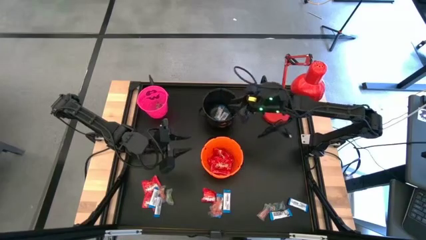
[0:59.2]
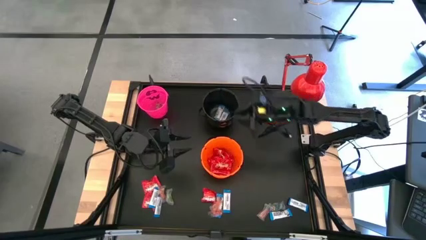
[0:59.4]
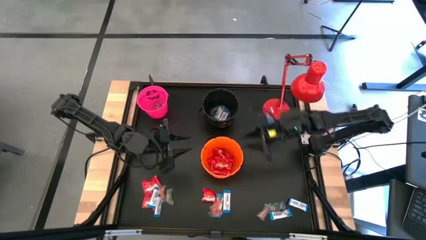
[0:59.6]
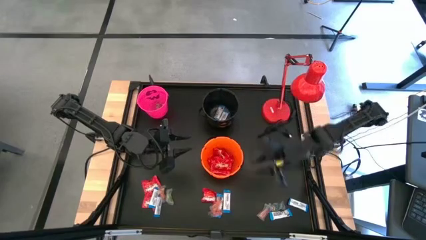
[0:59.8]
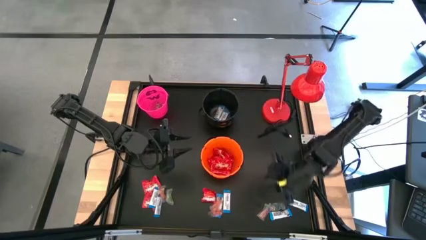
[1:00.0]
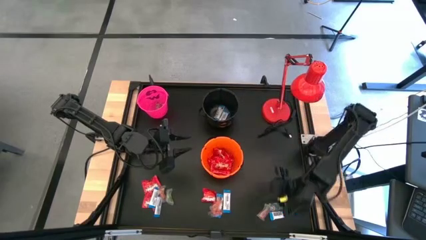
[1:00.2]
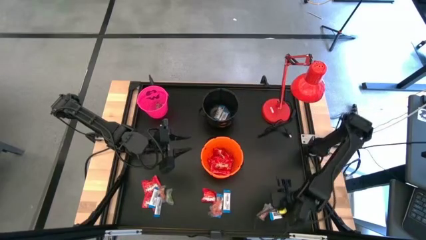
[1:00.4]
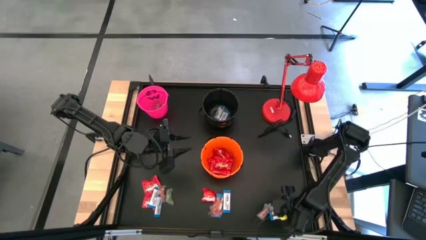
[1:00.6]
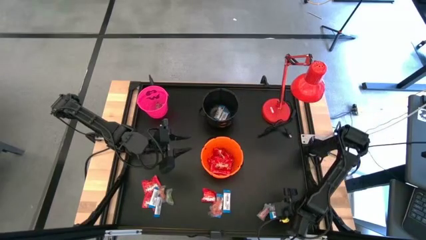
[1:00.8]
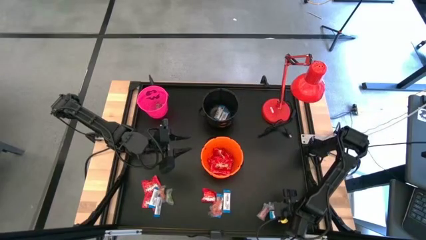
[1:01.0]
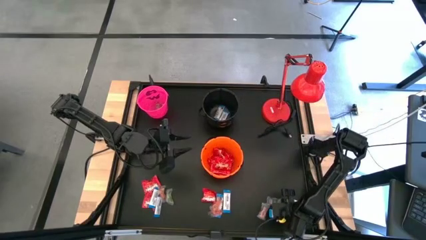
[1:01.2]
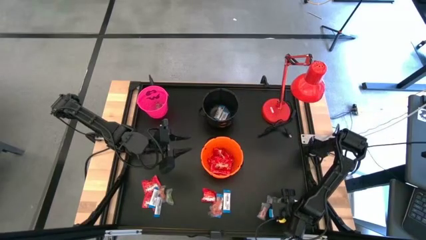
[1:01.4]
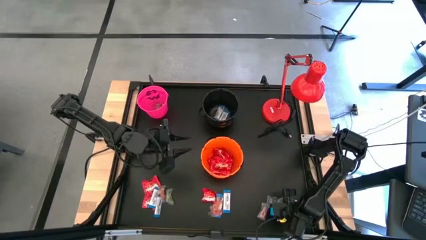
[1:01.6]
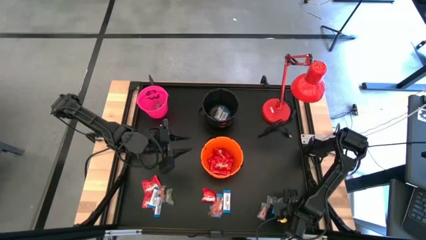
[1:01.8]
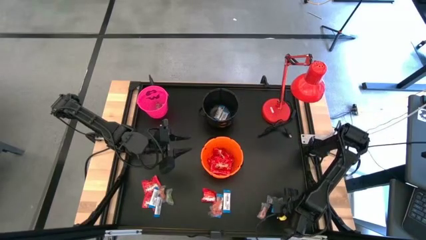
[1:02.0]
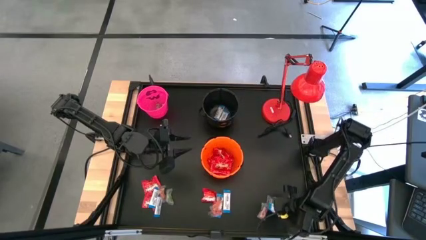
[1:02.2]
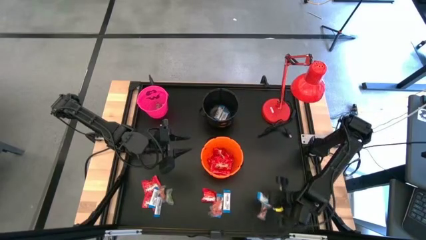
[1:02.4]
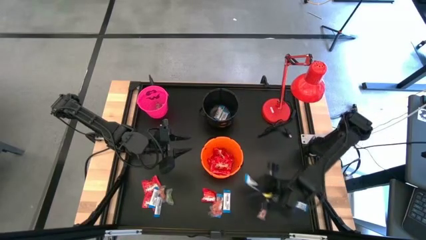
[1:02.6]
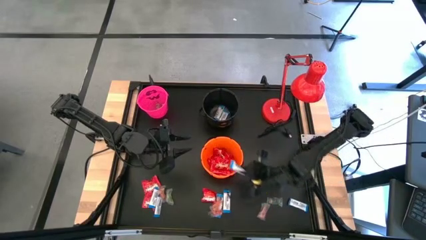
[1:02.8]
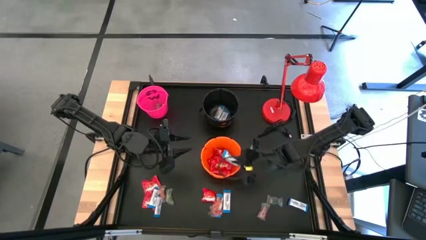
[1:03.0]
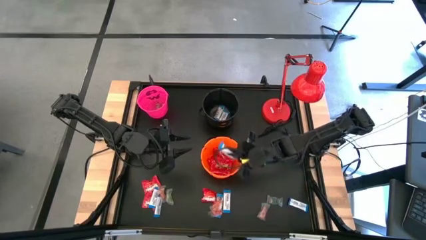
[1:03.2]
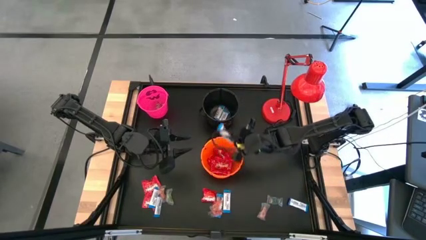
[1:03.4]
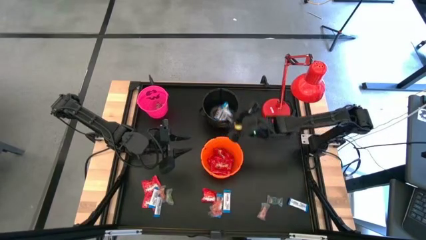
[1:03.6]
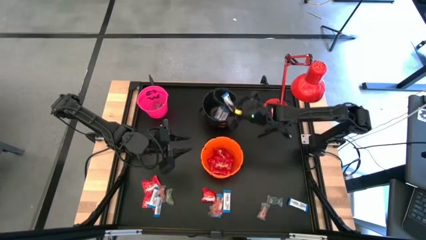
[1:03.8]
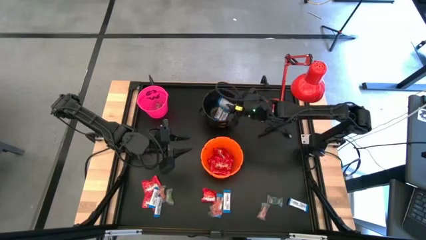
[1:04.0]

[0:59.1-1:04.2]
Task: Sort candy
Put the white chocolate into the black bucket

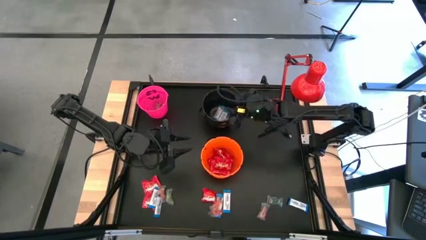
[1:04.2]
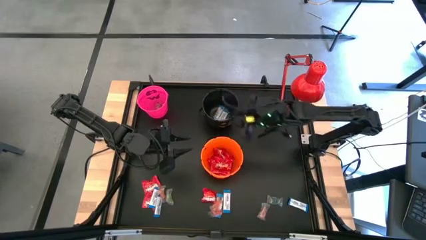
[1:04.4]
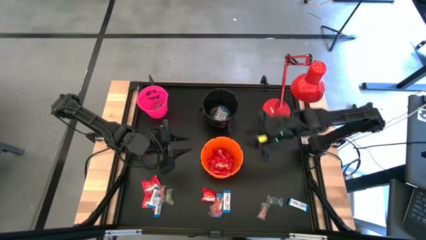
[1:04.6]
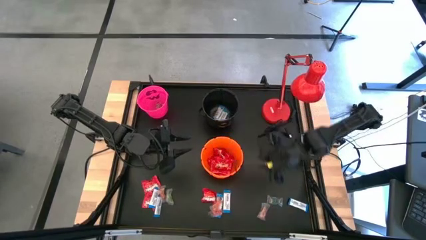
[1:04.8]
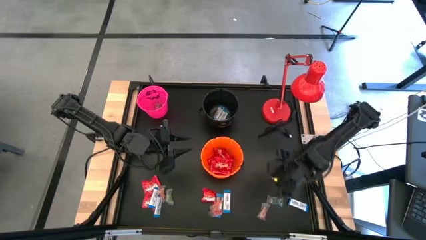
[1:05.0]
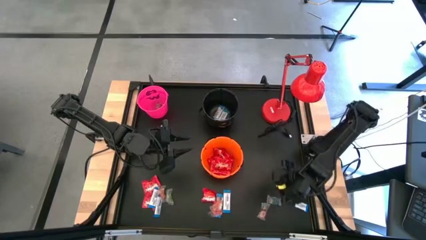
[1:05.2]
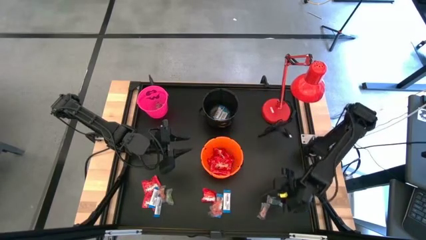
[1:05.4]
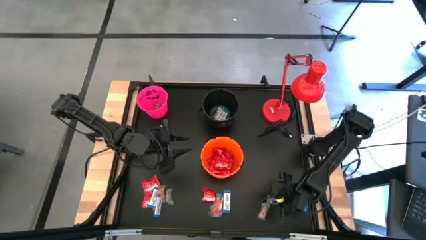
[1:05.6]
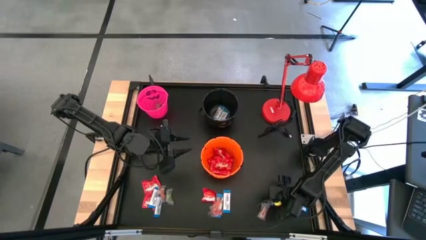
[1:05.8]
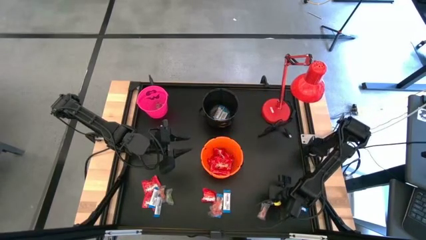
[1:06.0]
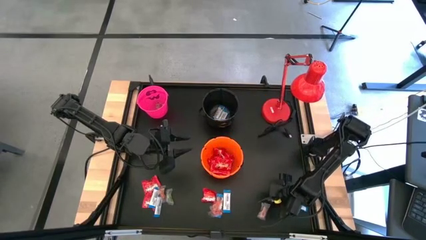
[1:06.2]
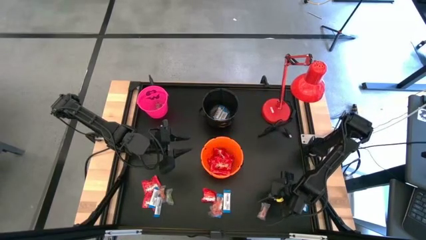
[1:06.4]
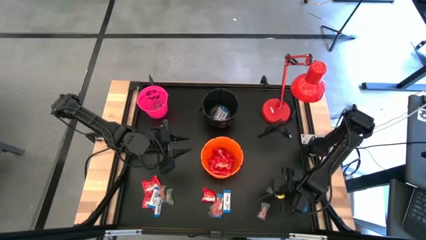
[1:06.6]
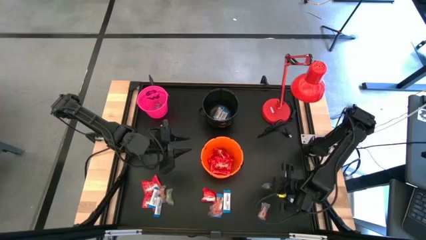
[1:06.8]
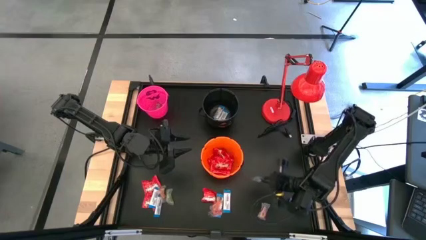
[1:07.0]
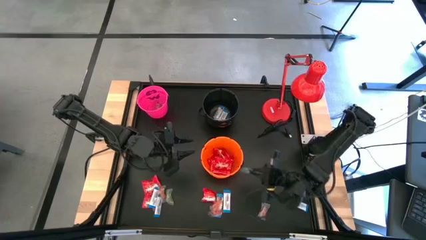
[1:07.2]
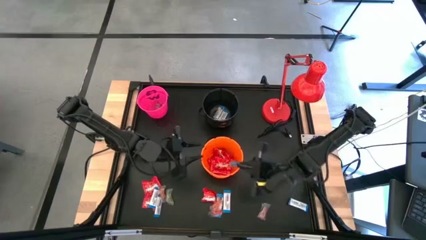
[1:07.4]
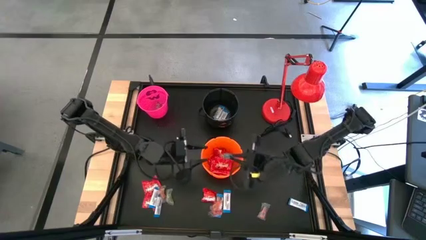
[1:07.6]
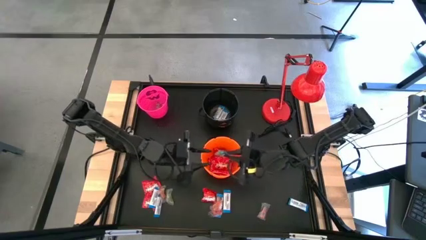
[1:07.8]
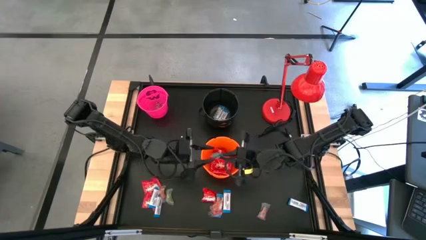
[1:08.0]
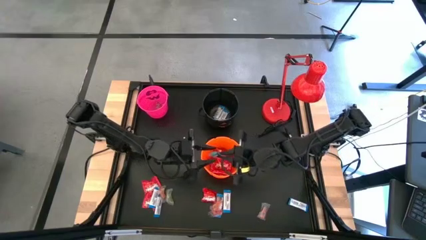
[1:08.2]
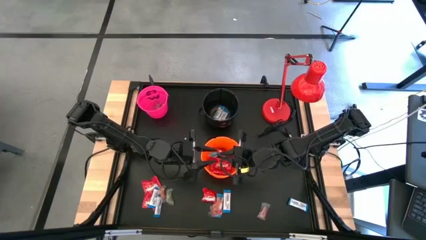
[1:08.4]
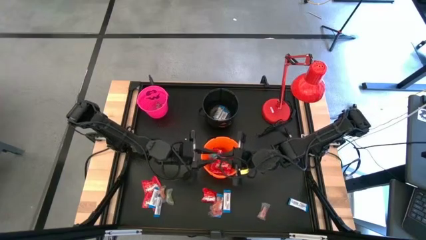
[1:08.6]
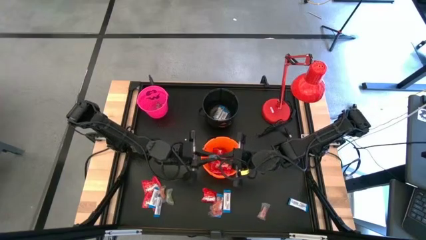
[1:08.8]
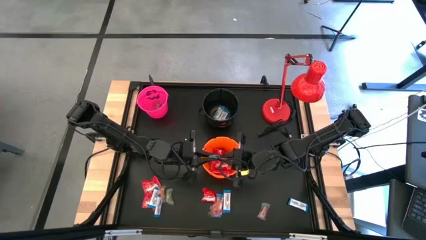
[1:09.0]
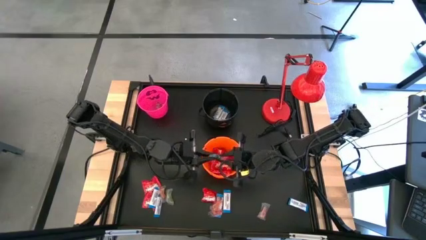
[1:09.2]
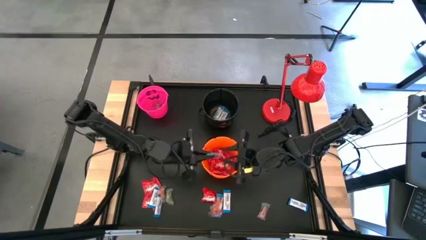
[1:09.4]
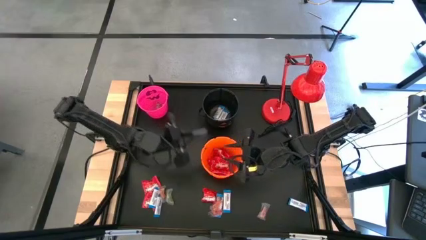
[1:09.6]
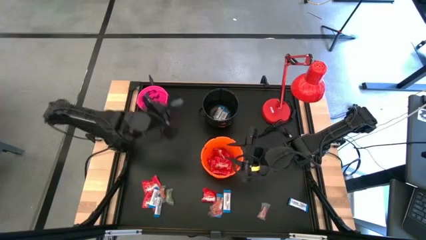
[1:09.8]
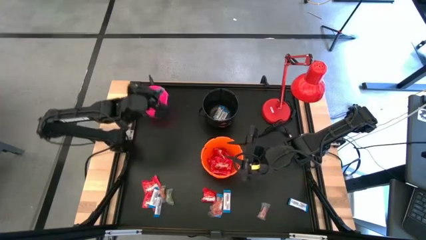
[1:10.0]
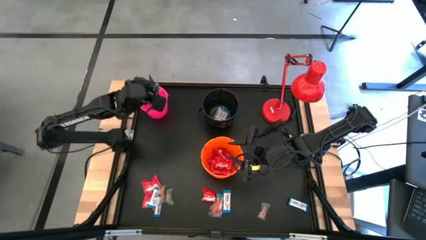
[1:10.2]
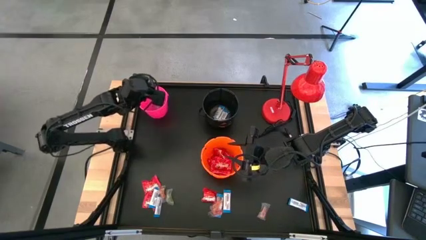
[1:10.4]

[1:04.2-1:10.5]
Put the blue gummy into the pink bucket

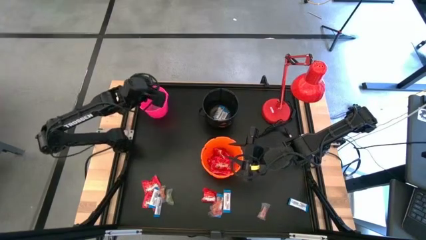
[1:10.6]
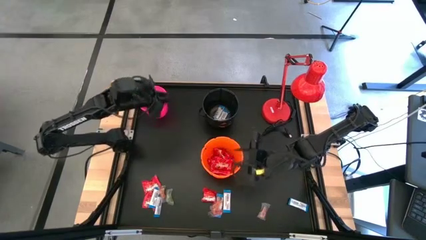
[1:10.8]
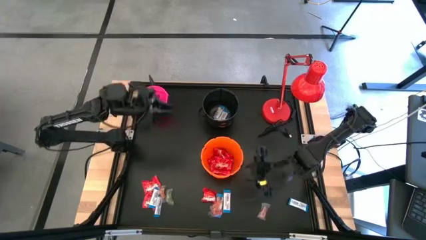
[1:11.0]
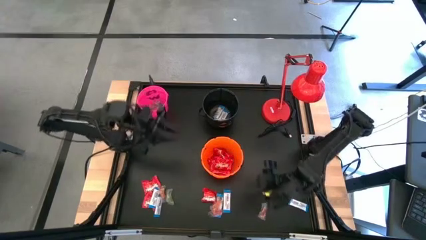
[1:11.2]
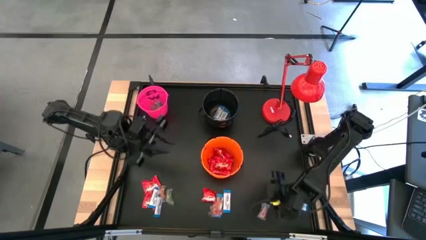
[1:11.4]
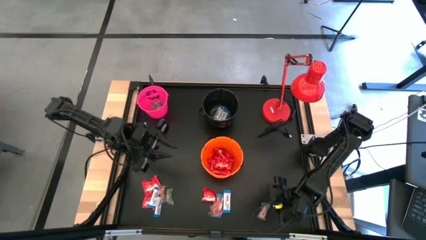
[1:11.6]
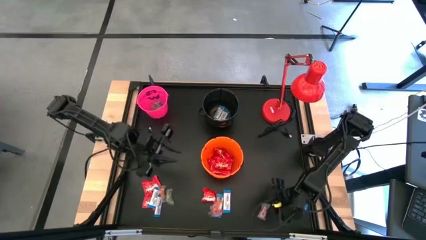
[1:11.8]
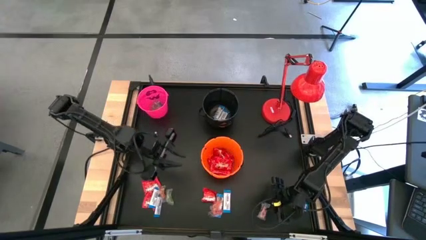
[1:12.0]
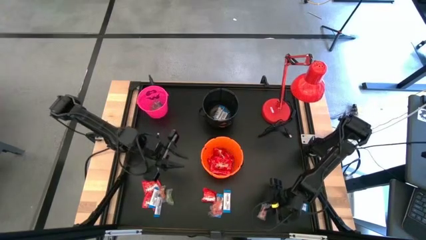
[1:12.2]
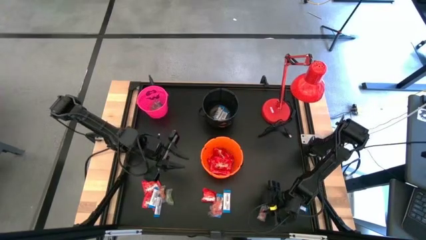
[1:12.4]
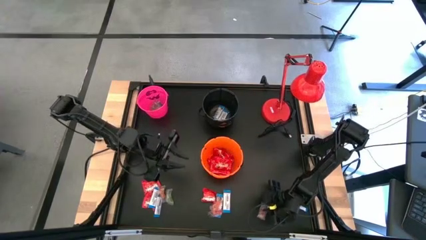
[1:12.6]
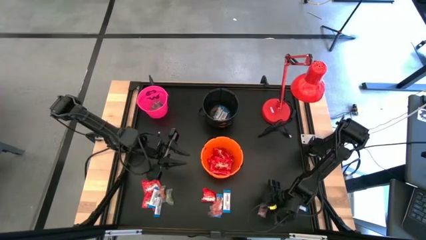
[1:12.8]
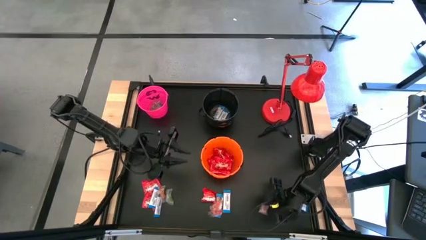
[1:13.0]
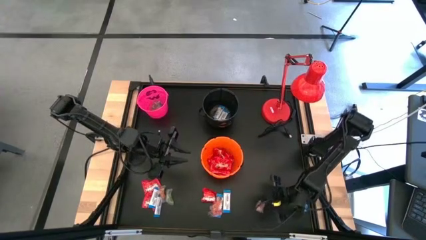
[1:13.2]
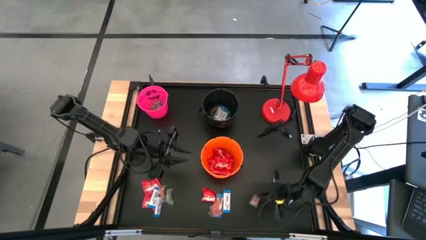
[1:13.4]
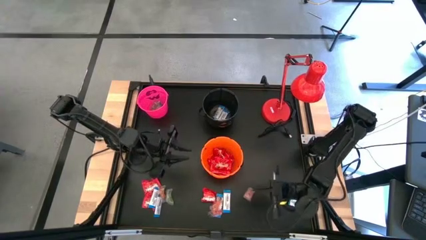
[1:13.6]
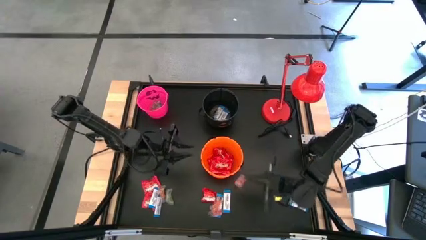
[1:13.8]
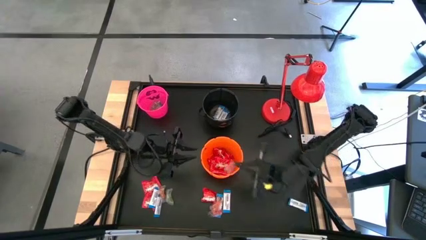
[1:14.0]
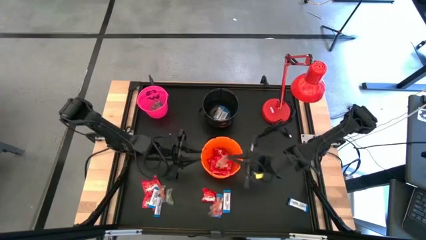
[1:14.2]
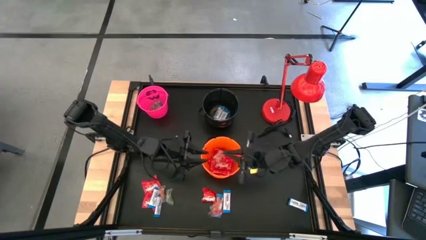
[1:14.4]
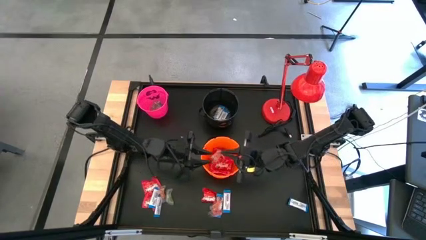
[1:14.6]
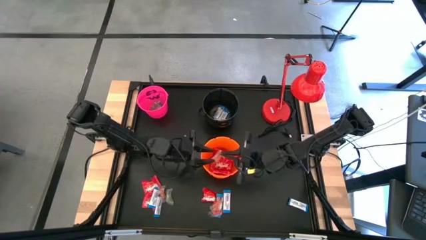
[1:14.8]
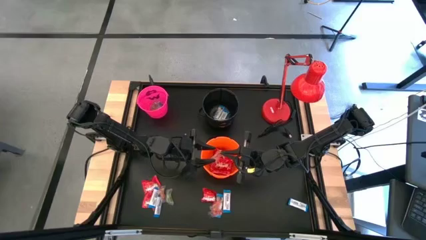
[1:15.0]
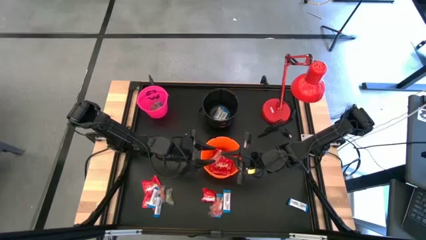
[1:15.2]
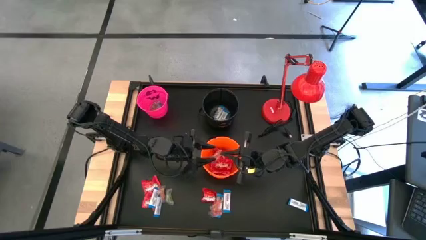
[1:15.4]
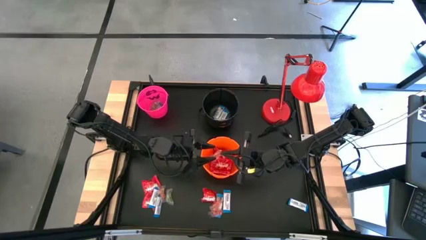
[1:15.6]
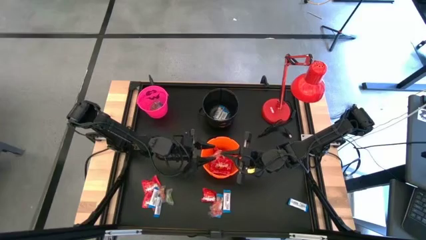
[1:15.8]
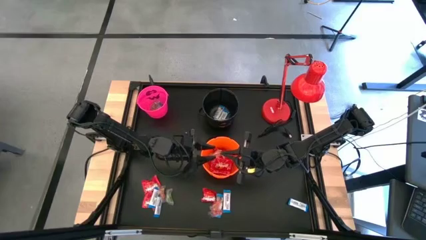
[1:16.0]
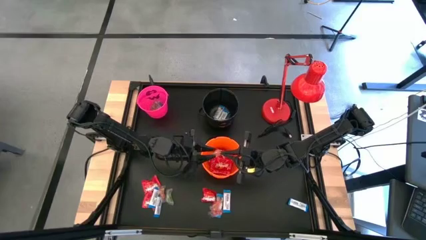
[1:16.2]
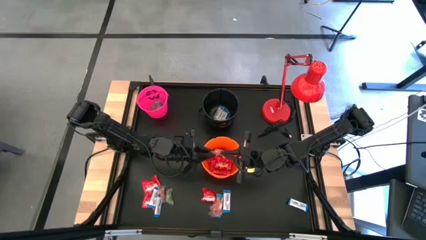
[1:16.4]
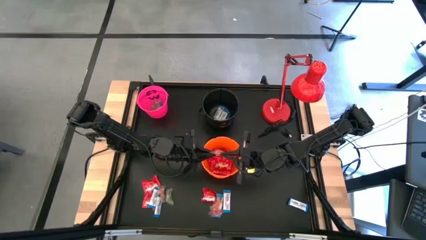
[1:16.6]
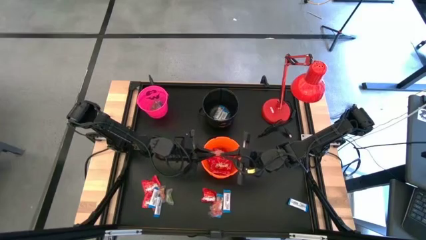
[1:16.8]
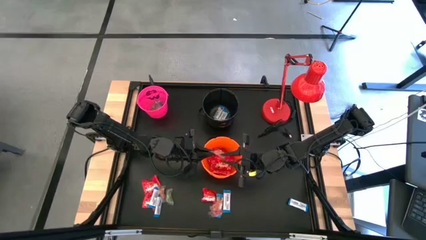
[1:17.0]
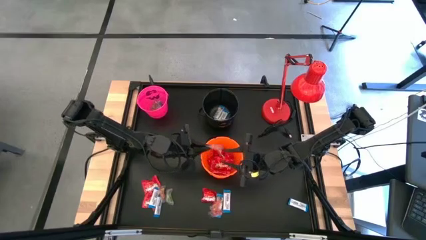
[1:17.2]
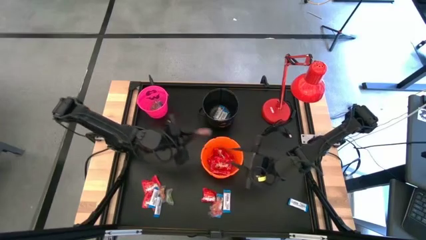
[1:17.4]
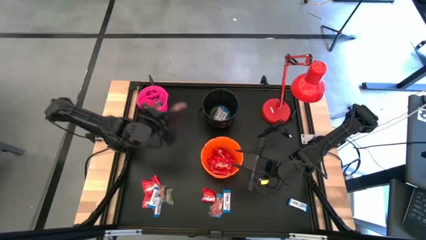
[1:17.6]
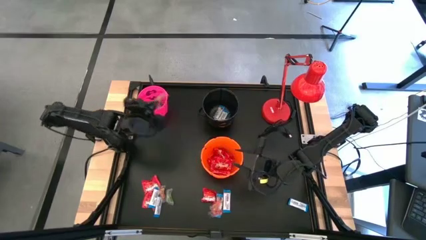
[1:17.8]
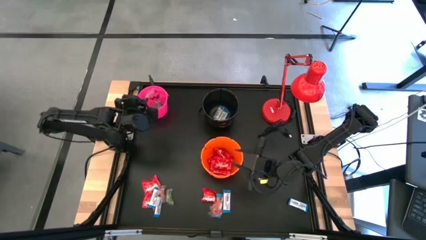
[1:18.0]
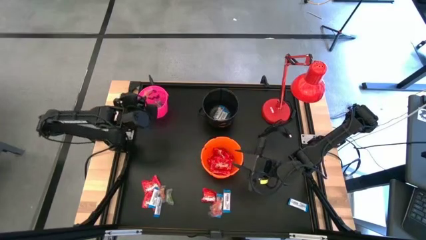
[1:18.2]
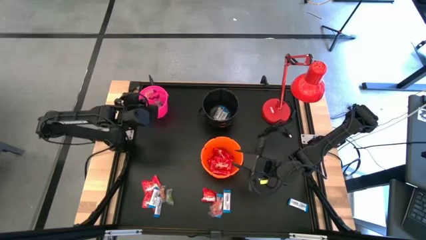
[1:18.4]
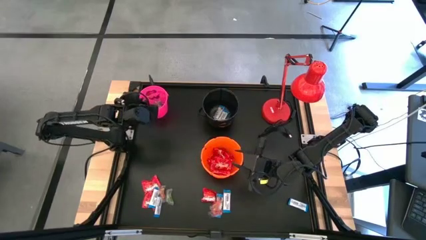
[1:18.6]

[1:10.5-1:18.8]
Put the orange gummy into the pink bucket
